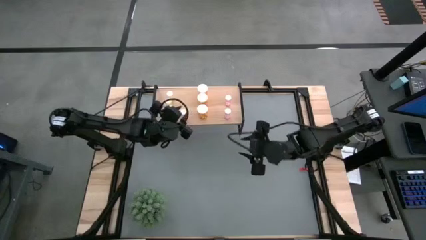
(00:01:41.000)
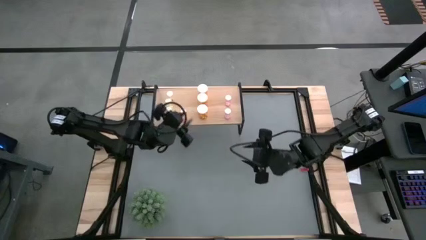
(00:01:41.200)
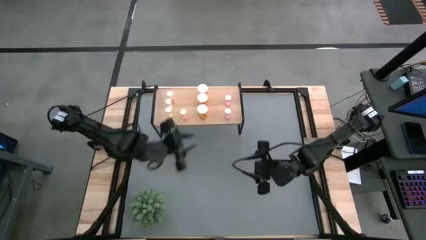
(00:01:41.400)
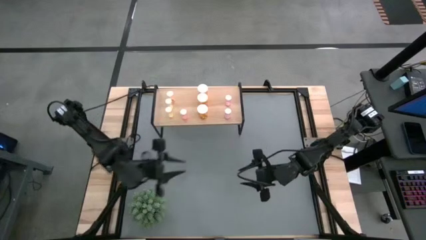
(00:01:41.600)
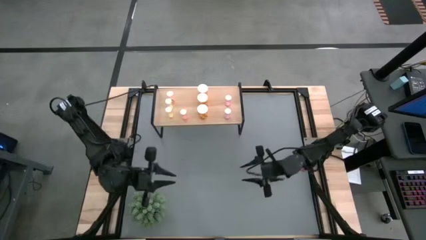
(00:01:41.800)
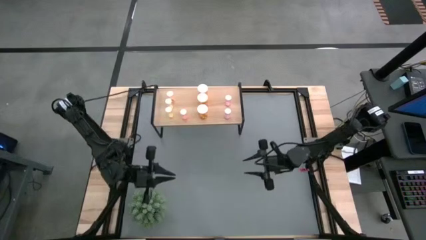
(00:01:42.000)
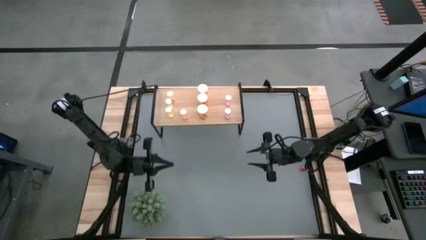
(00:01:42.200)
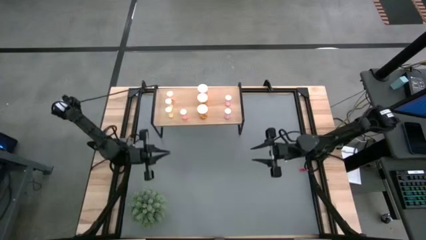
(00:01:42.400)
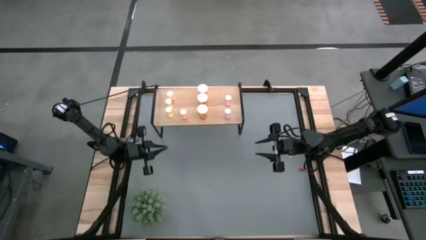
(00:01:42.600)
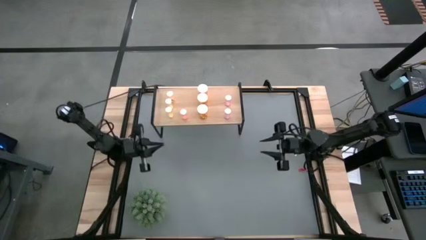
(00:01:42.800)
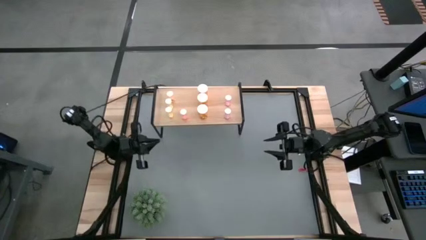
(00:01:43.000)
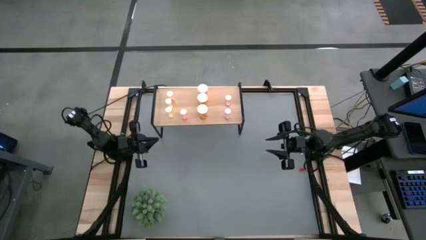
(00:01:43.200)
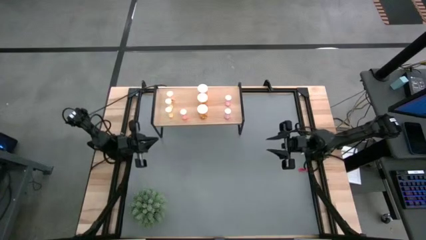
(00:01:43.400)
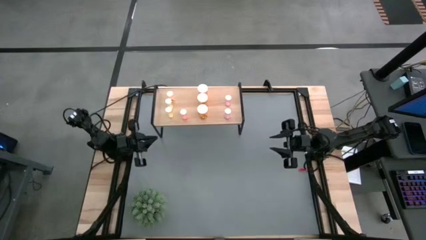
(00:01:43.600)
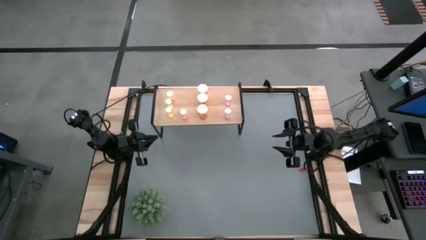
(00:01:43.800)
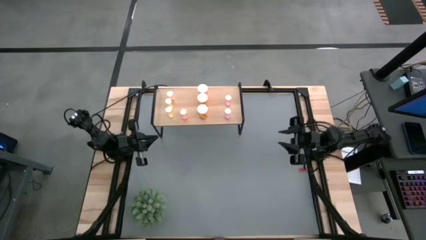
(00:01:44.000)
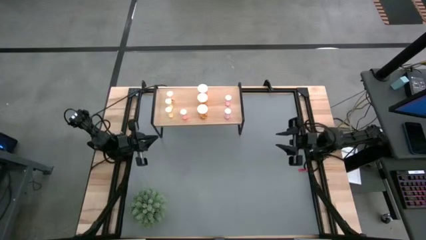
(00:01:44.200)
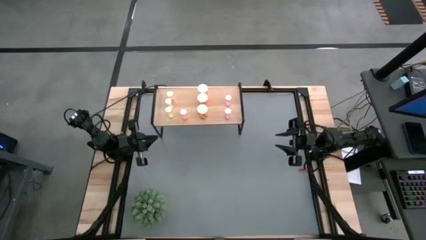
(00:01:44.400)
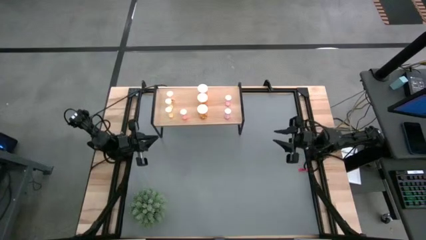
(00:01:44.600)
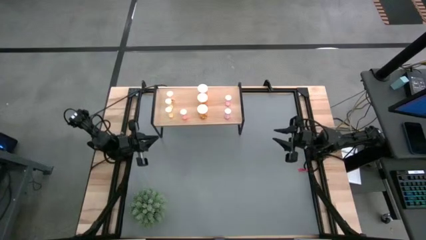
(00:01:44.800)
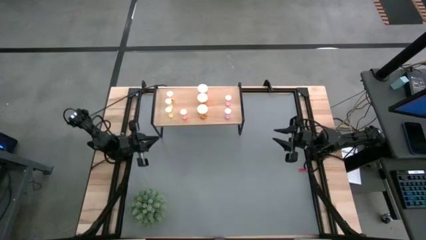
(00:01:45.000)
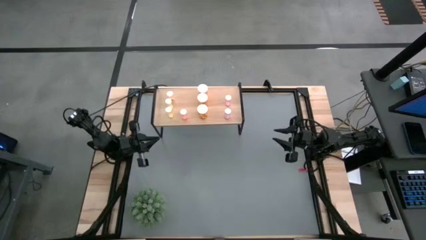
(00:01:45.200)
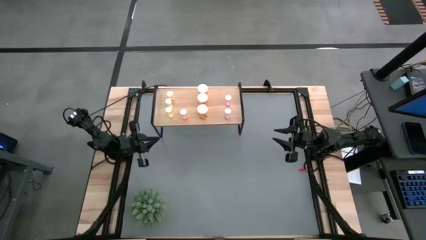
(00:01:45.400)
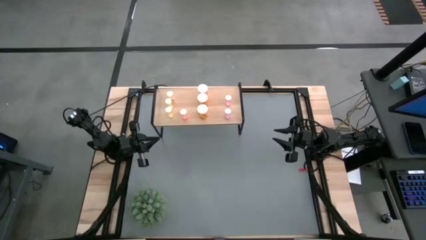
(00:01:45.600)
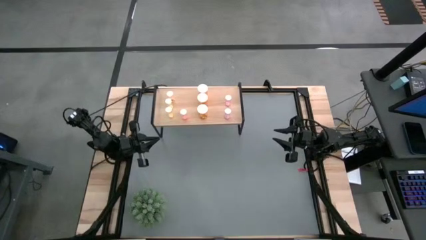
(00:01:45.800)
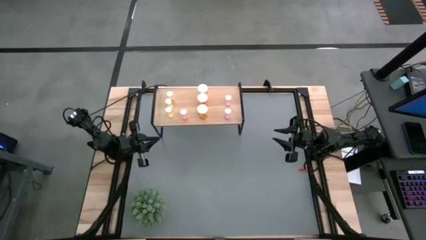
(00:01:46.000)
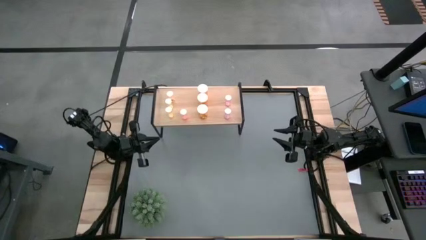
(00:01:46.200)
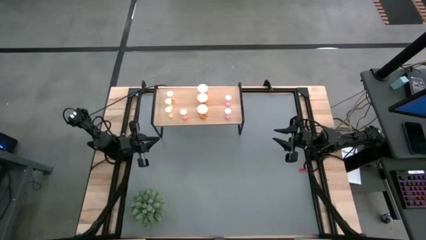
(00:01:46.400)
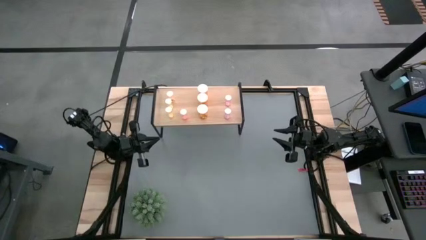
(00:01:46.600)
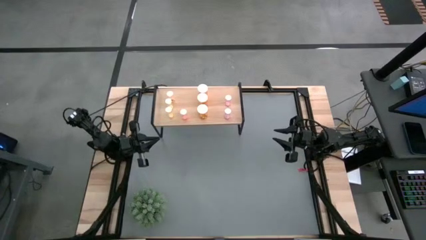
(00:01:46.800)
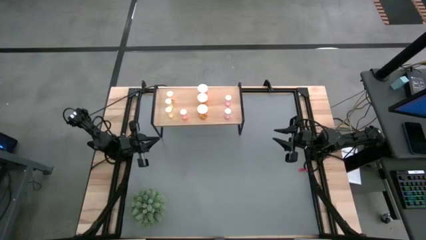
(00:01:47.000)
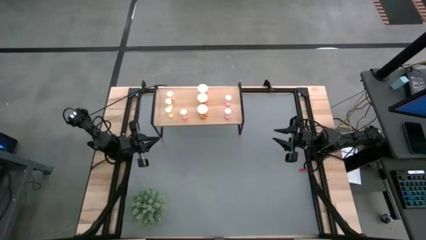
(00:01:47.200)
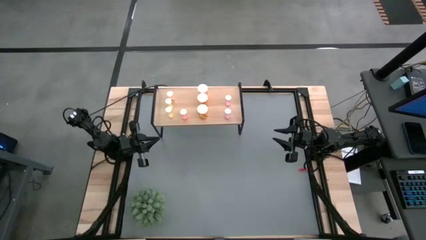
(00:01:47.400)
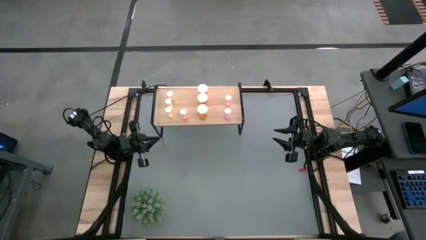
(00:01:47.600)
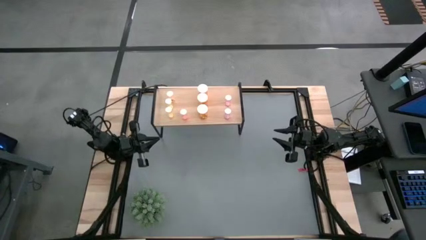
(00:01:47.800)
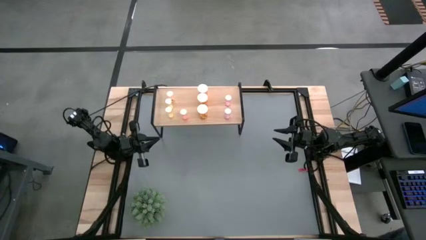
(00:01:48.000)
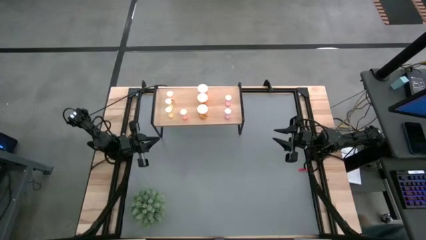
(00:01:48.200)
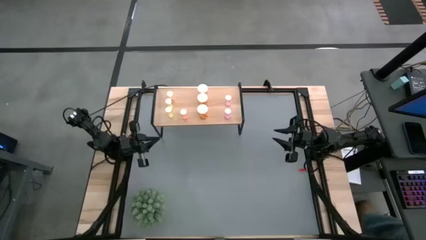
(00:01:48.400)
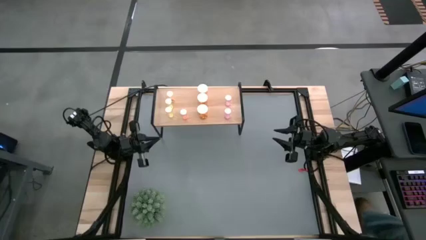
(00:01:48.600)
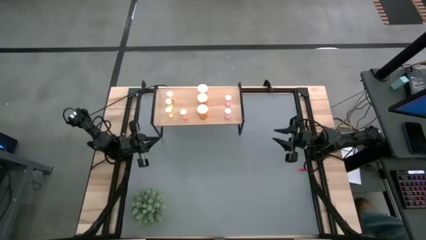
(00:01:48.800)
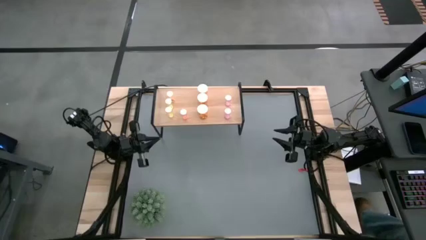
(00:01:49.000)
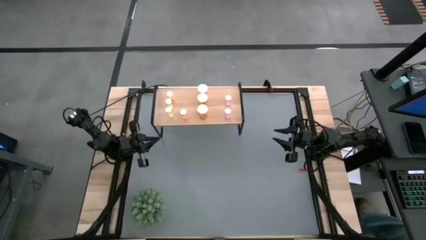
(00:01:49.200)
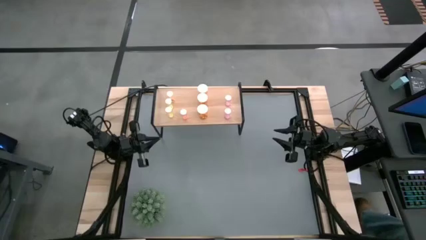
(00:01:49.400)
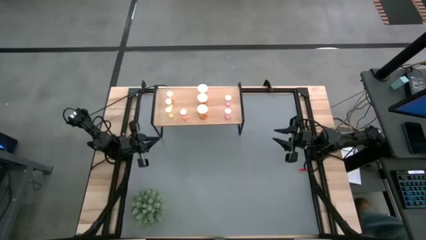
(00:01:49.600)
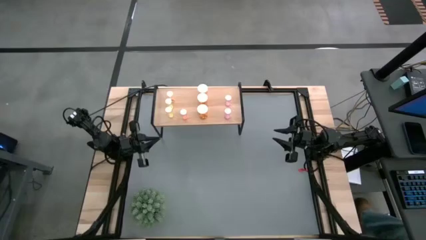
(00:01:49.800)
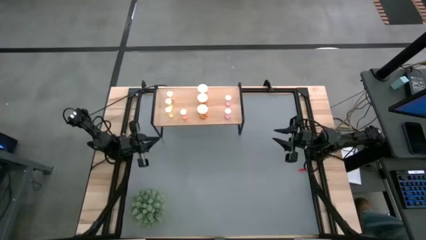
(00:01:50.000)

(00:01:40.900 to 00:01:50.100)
Task: Pick and place medicine bottles onto shelf by color
Return to Home Position

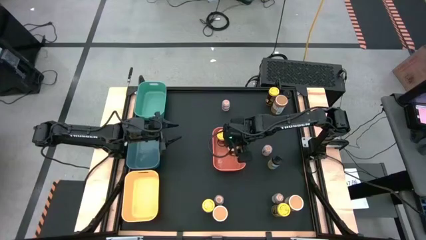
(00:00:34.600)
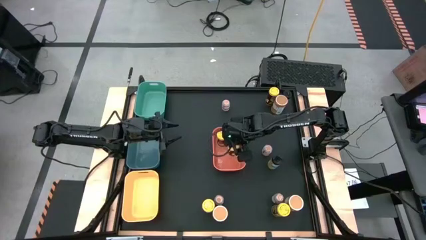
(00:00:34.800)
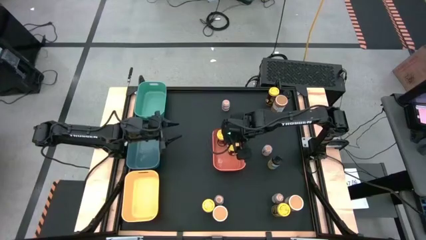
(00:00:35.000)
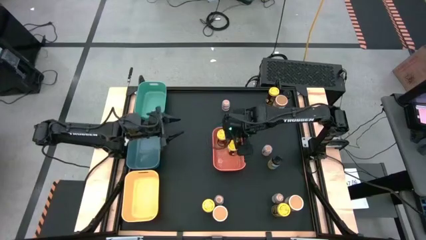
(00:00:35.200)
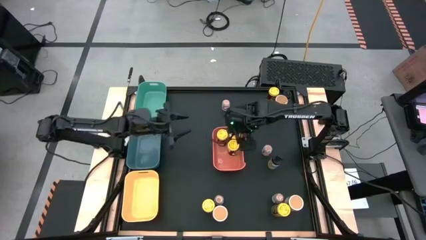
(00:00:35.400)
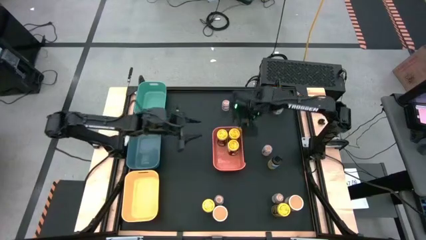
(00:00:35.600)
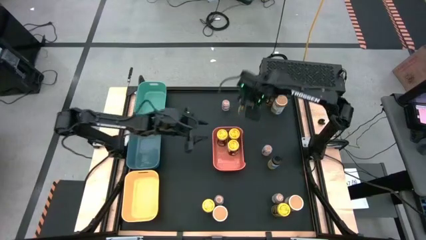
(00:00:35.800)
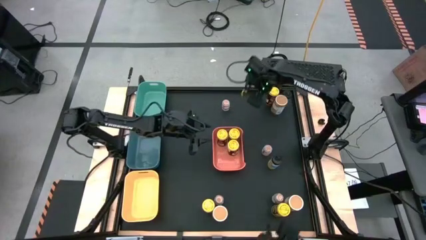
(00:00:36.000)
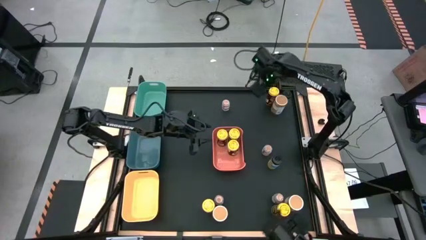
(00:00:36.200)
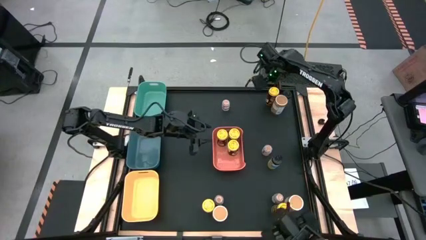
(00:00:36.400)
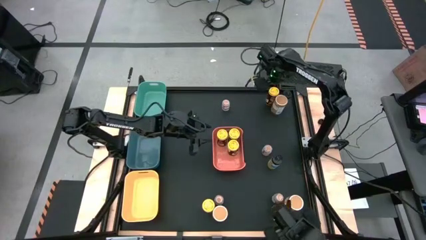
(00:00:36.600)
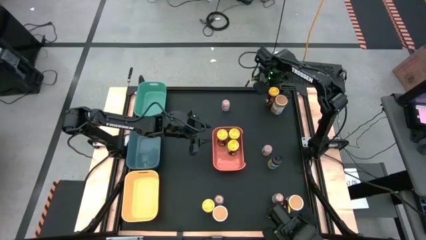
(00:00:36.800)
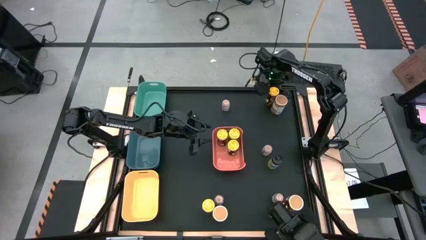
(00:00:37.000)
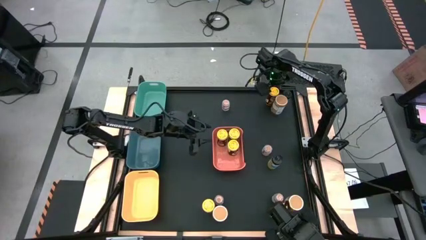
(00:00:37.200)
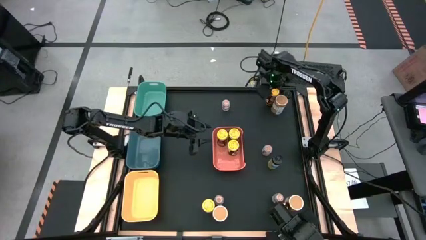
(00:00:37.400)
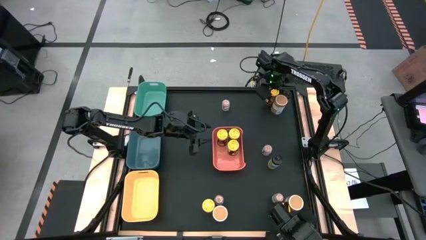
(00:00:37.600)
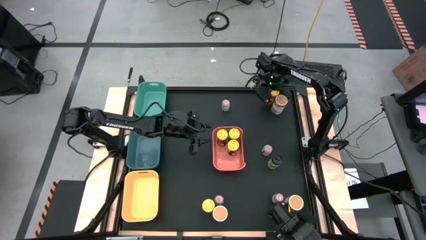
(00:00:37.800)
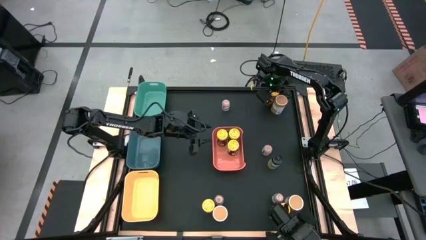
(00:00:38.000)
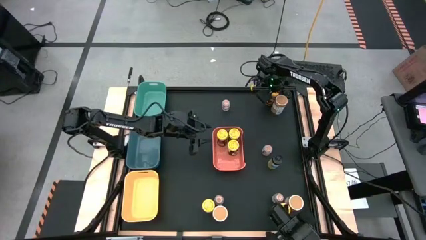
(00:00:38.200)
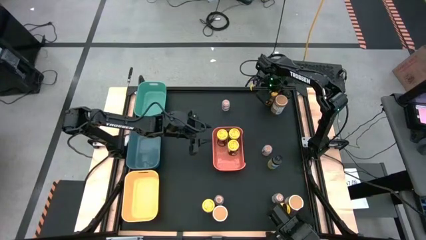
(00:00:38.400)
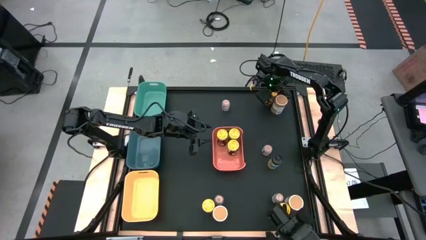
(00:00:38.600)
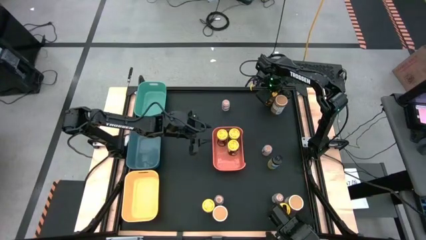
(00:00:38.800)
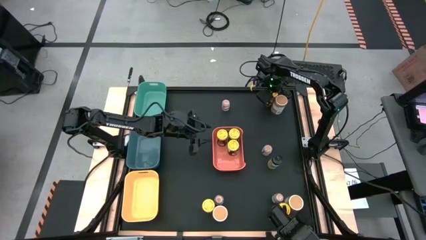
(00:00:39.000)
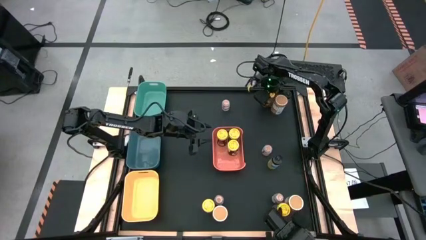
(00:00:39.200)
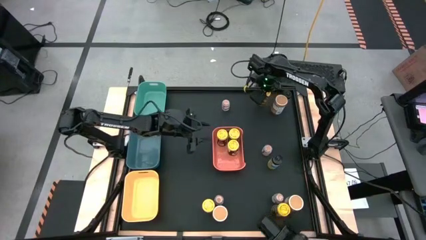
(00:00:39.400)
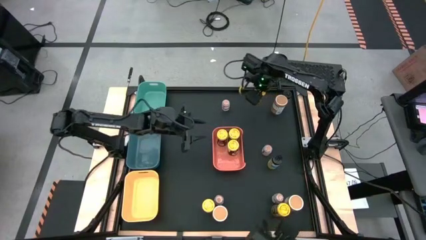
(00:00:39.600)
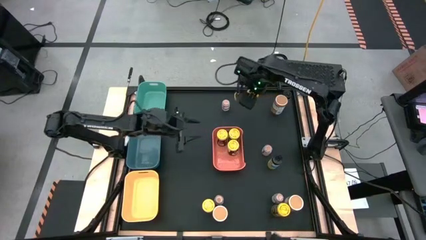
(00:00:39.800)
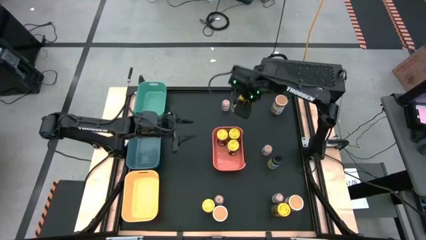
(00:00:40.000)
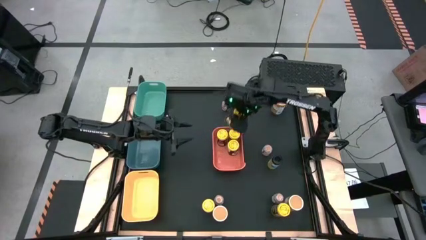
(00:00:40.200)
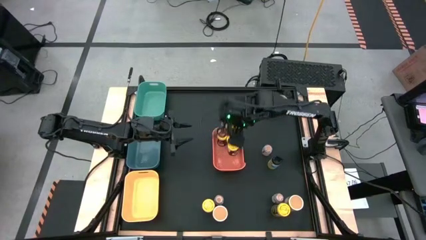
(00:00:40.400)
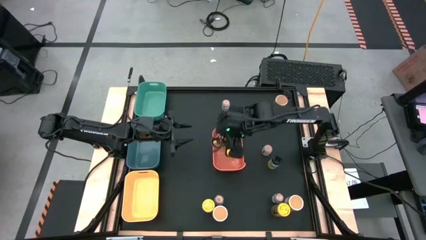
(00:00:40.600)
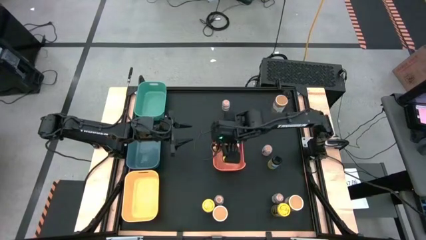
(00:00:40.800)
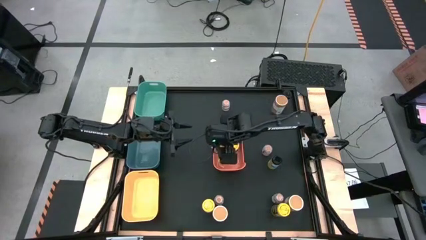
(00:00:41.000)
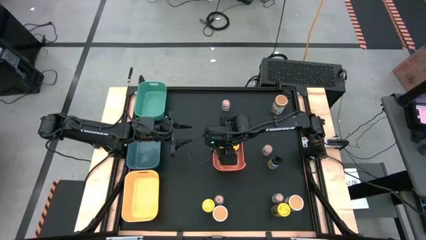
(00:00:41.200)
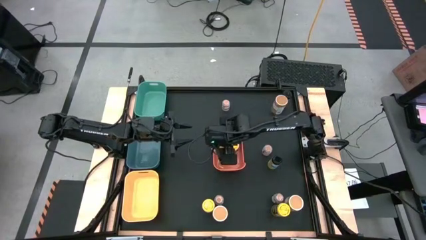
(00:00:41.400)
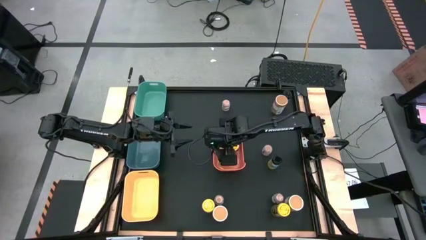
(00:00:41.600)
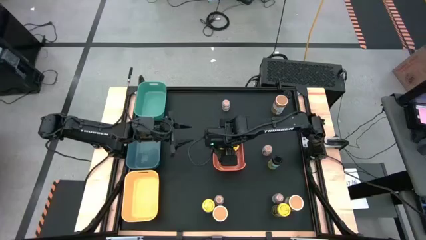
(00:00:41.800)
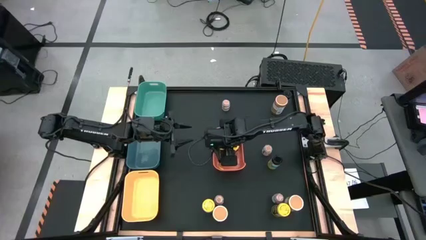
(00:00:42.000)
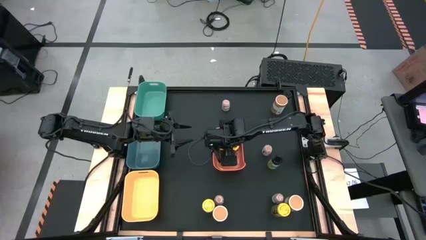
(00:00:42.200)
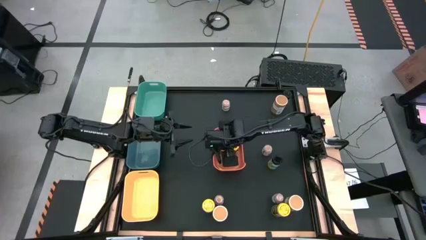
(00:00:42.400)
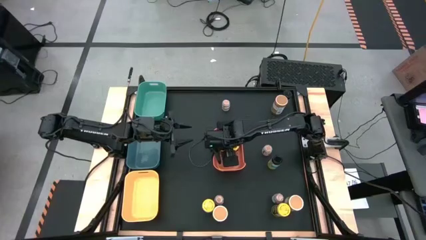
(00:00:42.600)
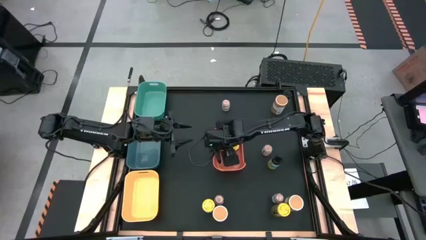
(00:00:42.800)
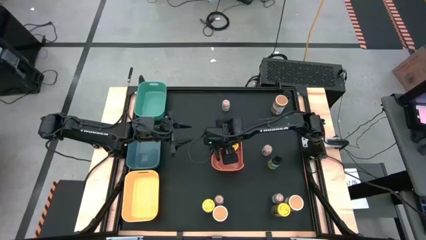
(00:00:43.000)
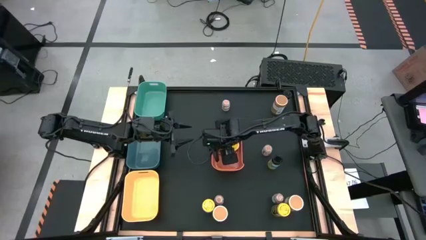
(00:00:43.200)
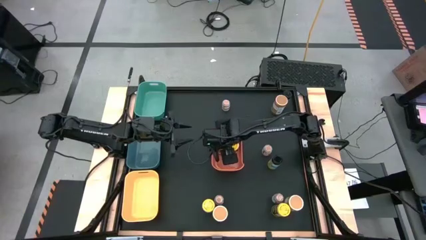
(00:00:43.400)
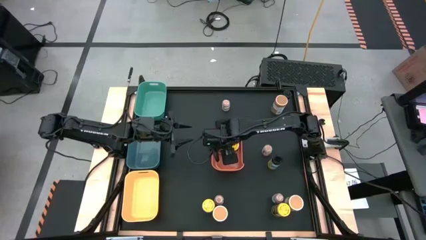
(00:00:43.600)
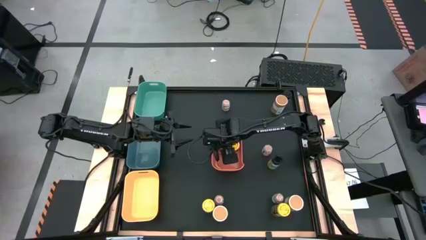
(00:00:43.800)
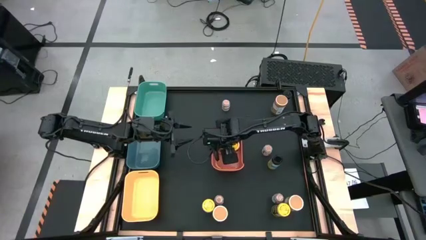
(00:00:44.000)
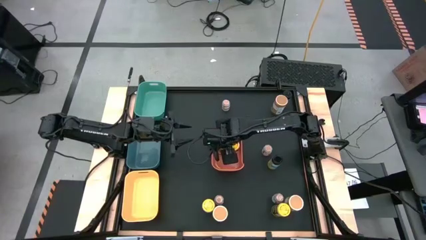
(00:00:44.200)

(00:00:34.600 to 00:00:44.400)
Task: Sort spices by type
Put the yellow seasoning can in the orange bin
